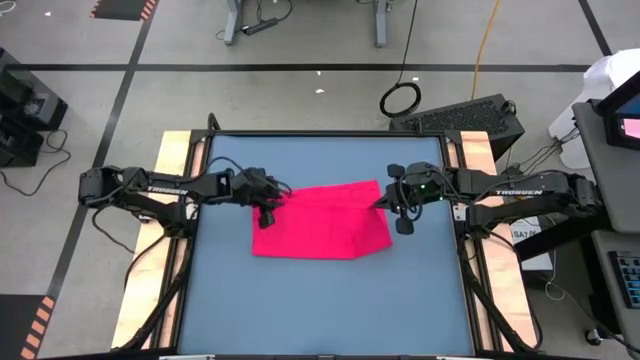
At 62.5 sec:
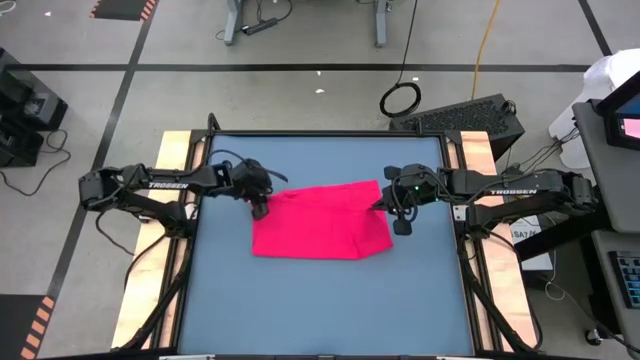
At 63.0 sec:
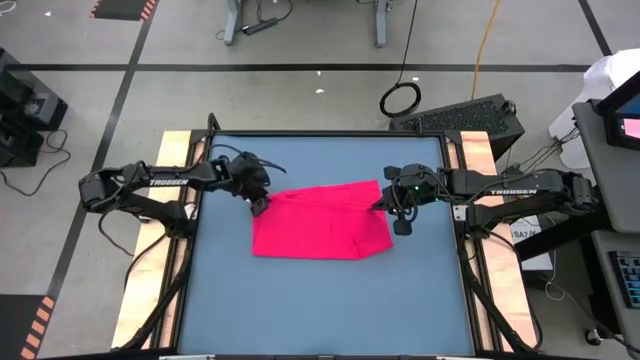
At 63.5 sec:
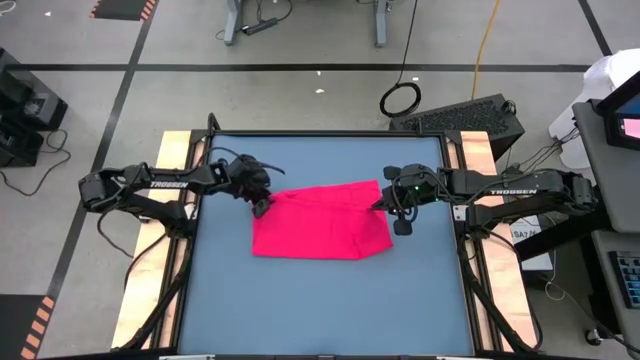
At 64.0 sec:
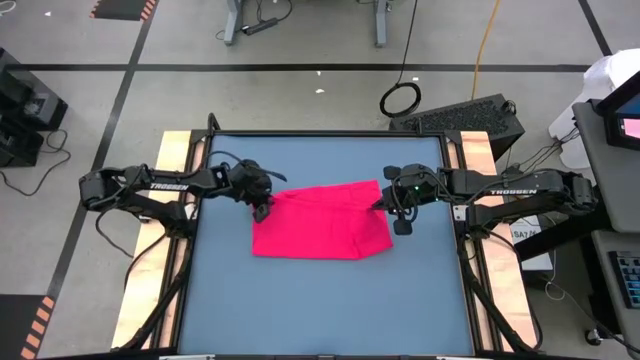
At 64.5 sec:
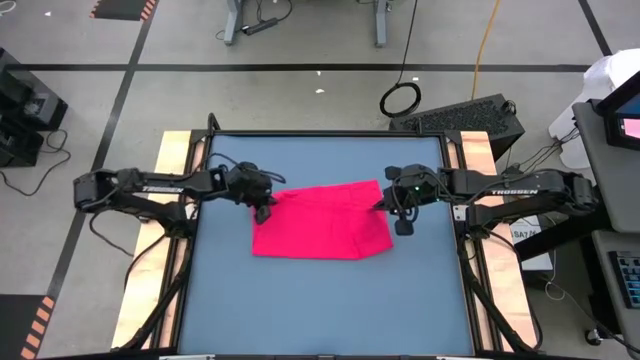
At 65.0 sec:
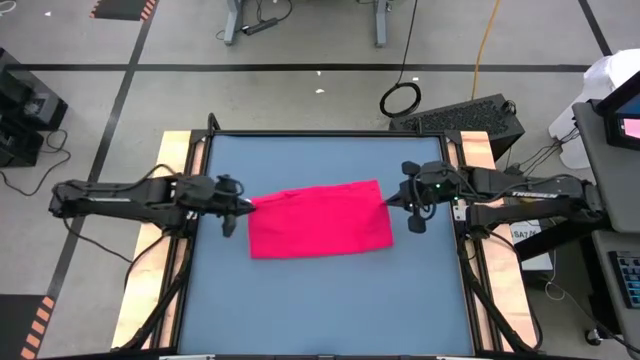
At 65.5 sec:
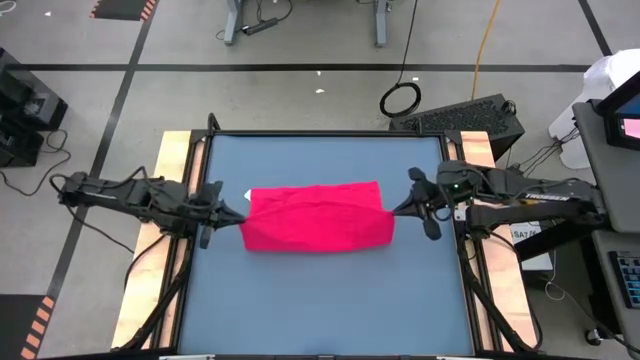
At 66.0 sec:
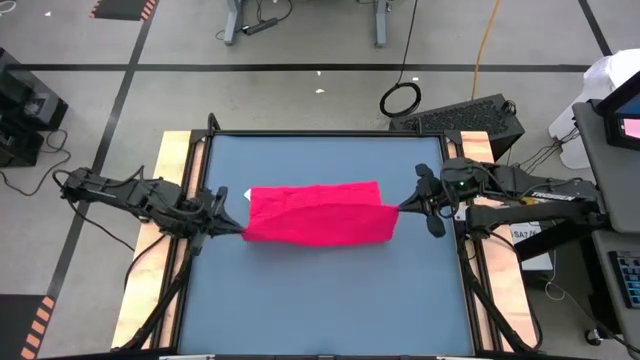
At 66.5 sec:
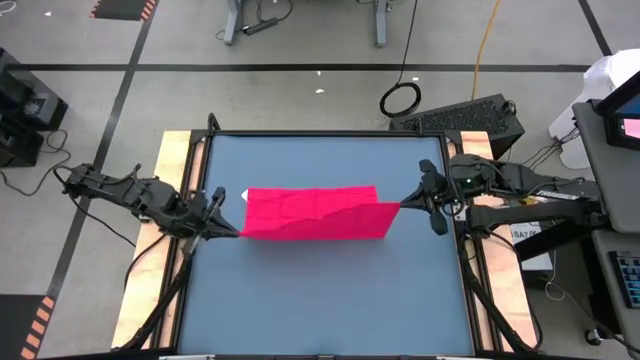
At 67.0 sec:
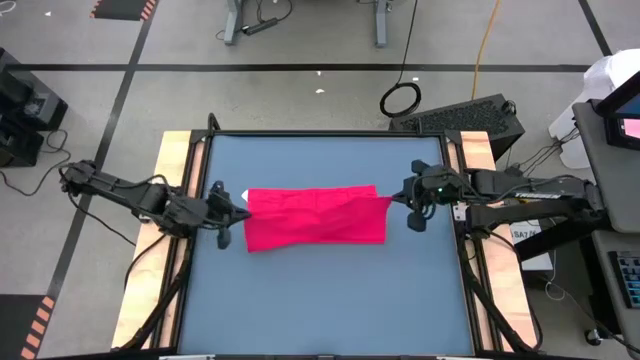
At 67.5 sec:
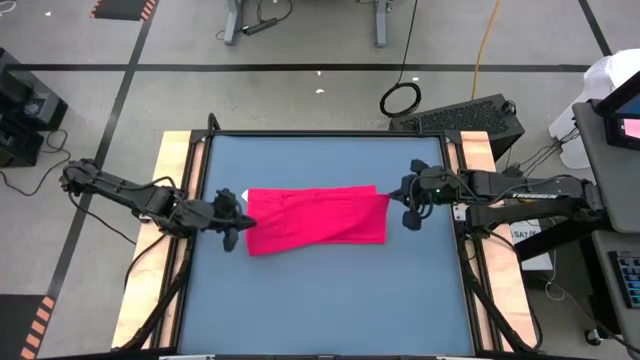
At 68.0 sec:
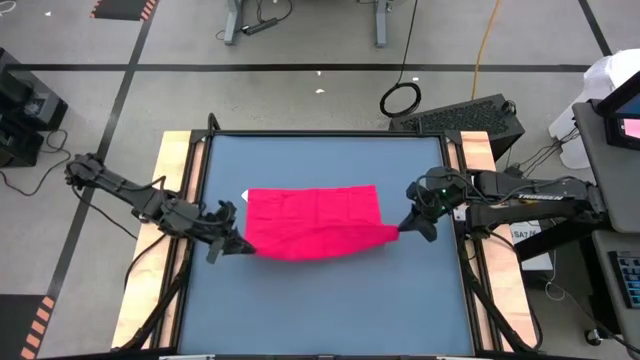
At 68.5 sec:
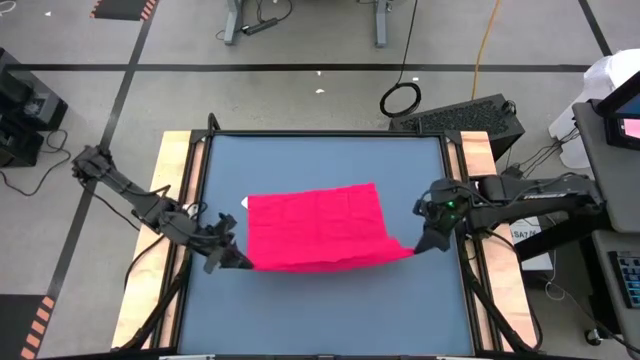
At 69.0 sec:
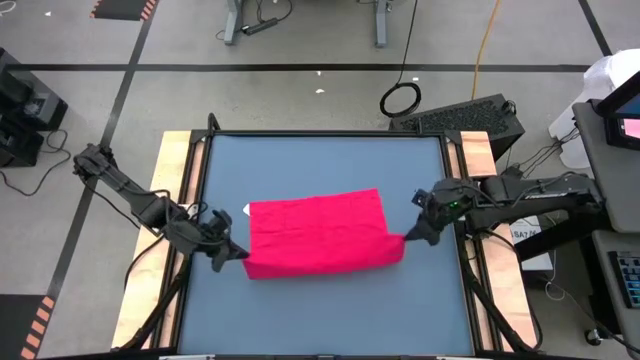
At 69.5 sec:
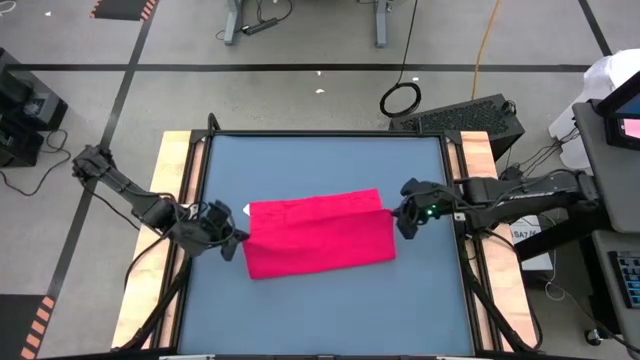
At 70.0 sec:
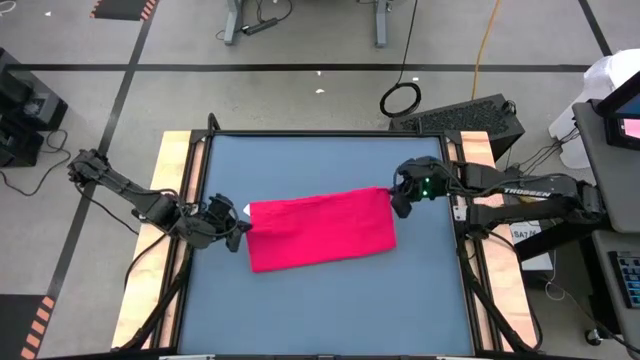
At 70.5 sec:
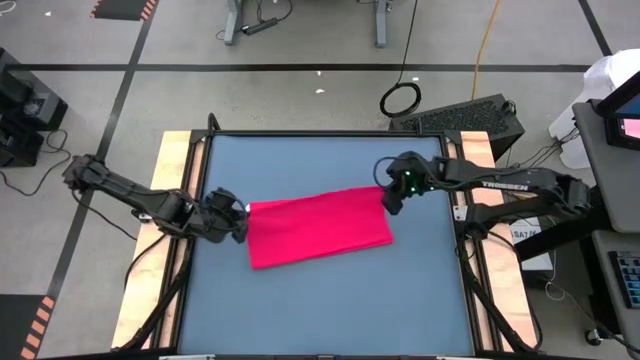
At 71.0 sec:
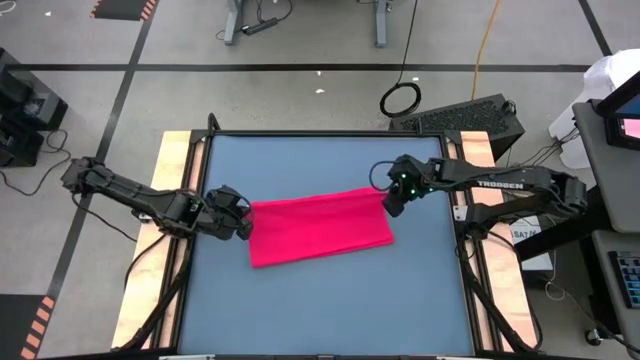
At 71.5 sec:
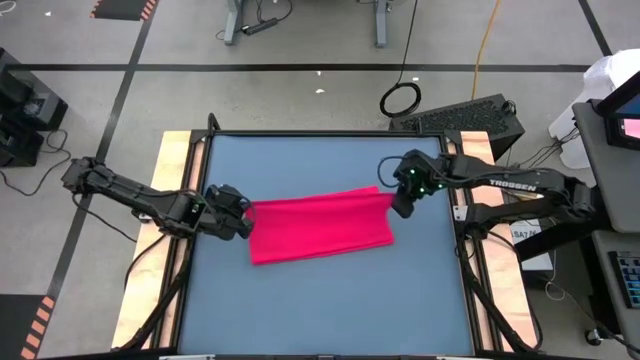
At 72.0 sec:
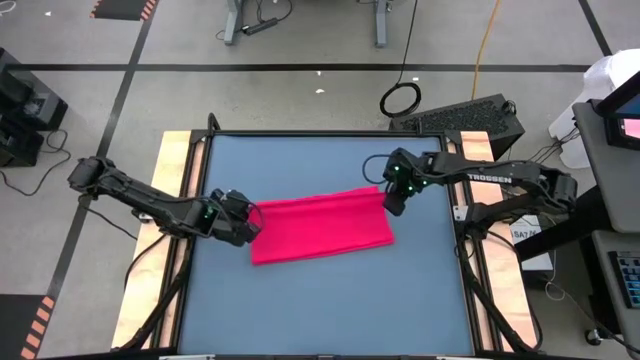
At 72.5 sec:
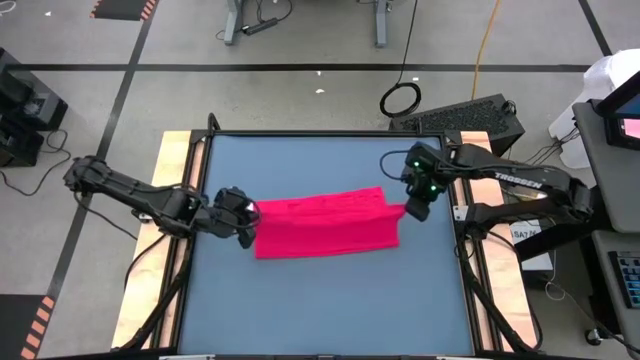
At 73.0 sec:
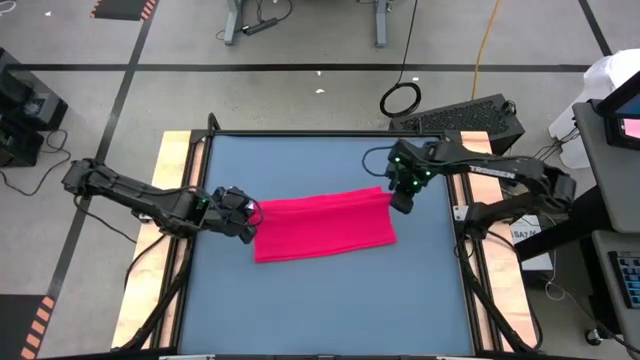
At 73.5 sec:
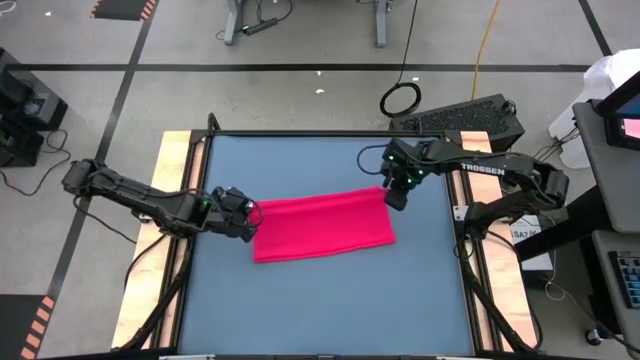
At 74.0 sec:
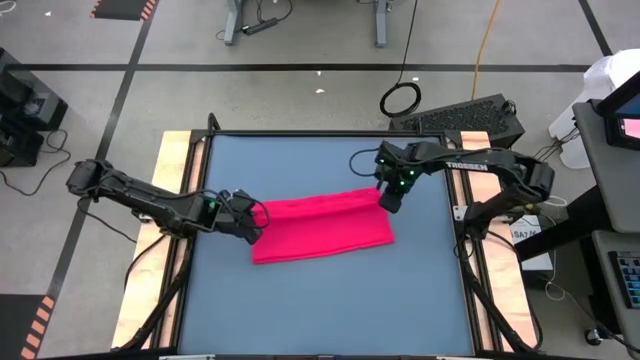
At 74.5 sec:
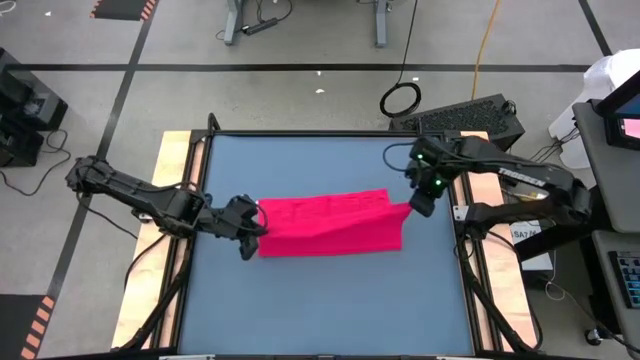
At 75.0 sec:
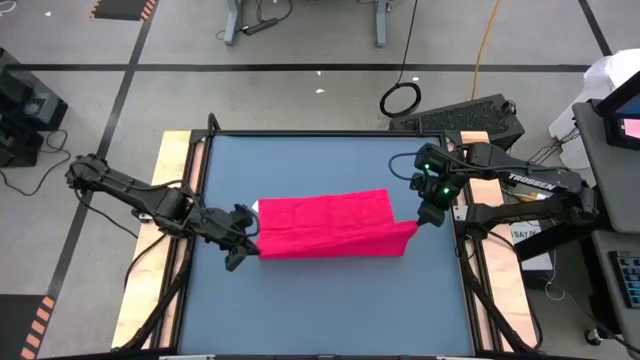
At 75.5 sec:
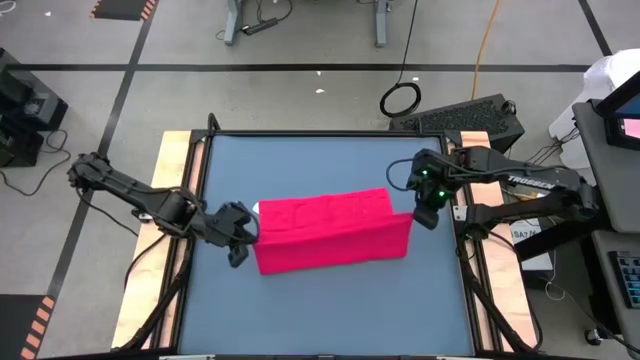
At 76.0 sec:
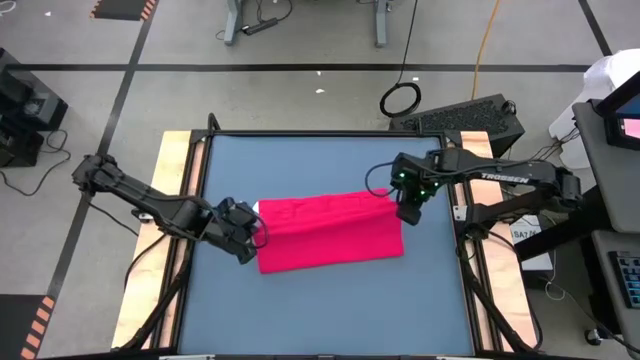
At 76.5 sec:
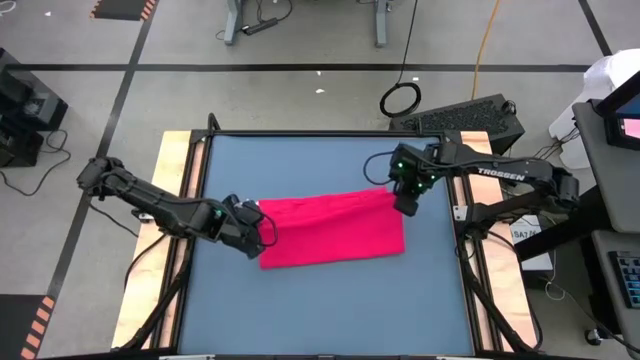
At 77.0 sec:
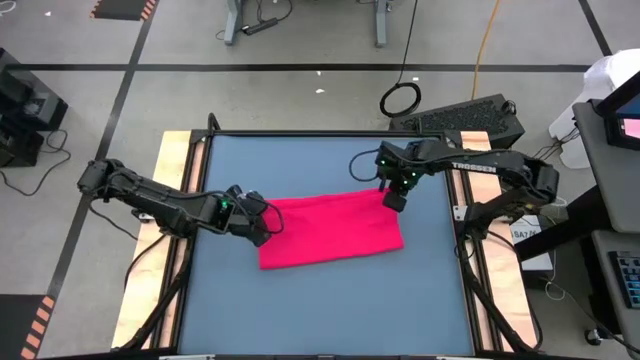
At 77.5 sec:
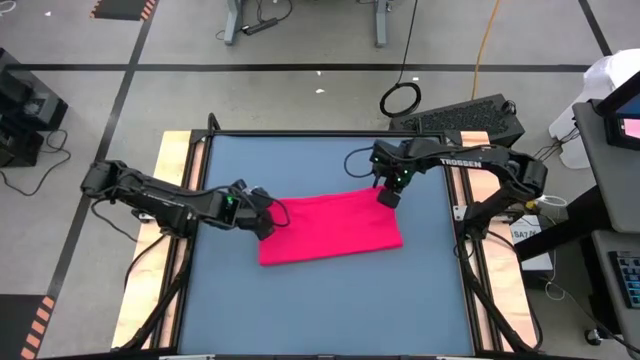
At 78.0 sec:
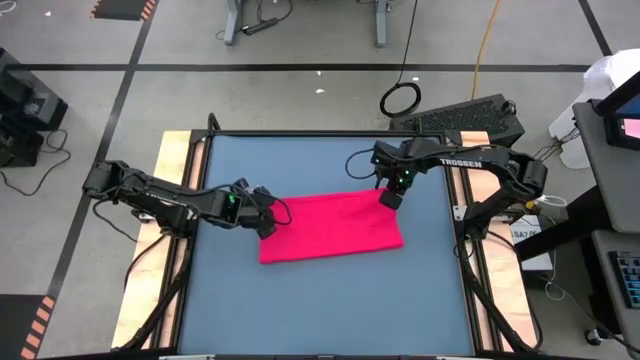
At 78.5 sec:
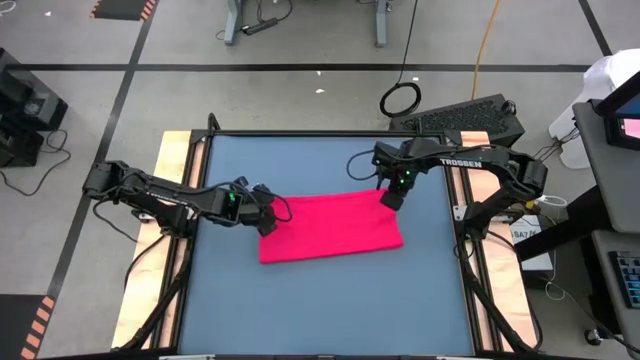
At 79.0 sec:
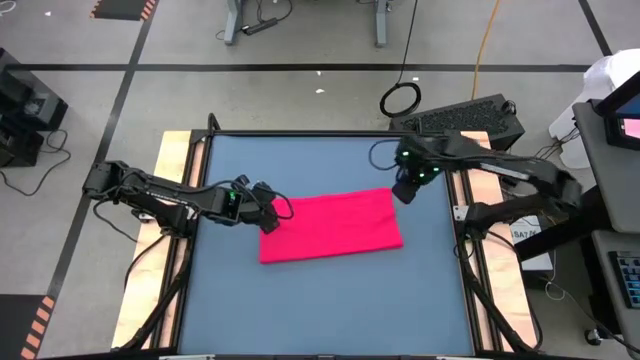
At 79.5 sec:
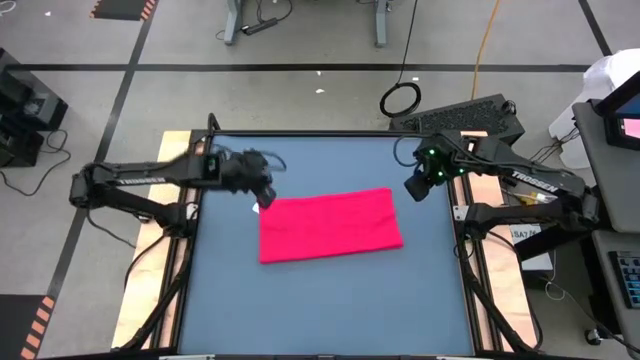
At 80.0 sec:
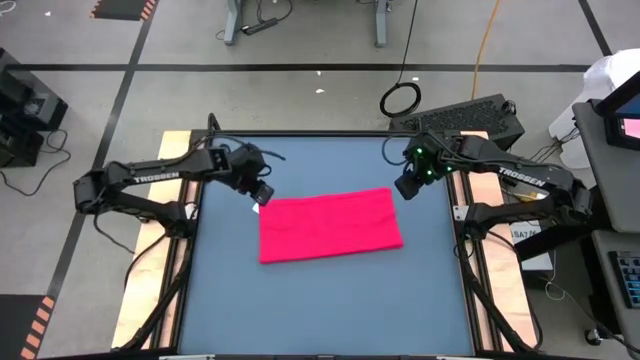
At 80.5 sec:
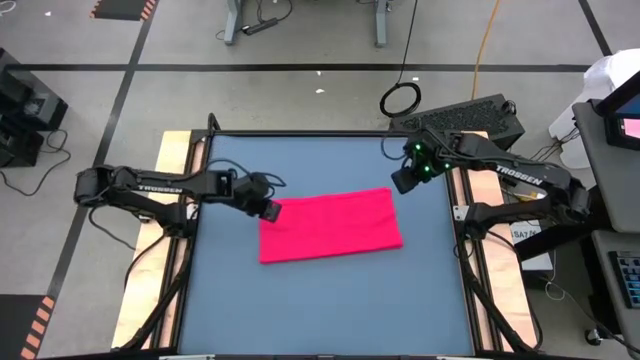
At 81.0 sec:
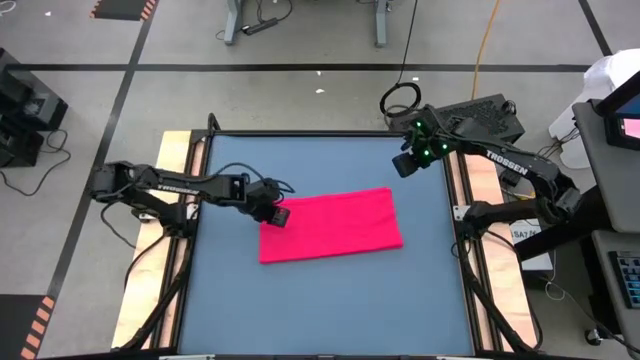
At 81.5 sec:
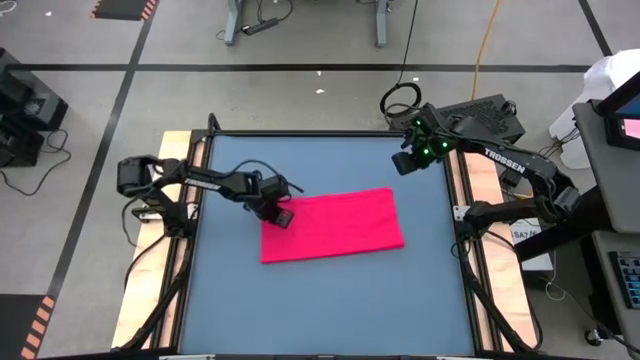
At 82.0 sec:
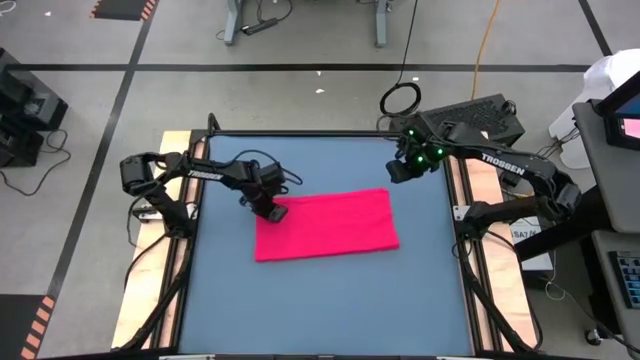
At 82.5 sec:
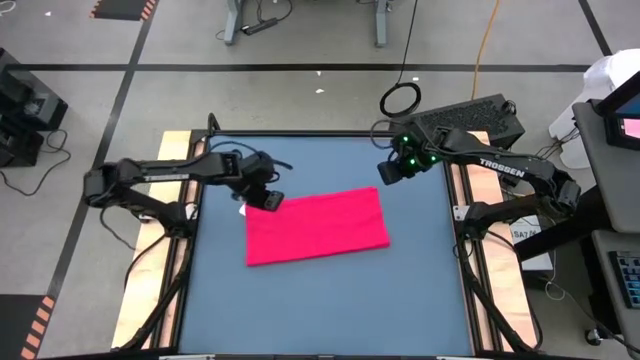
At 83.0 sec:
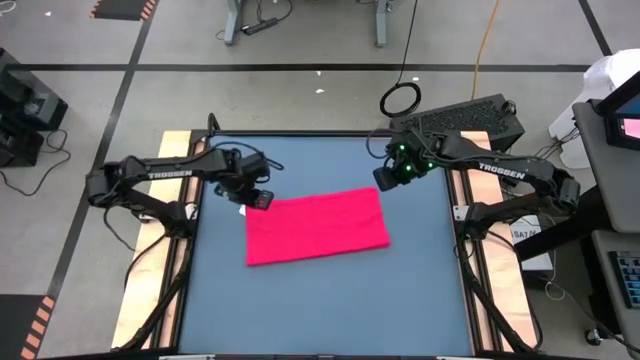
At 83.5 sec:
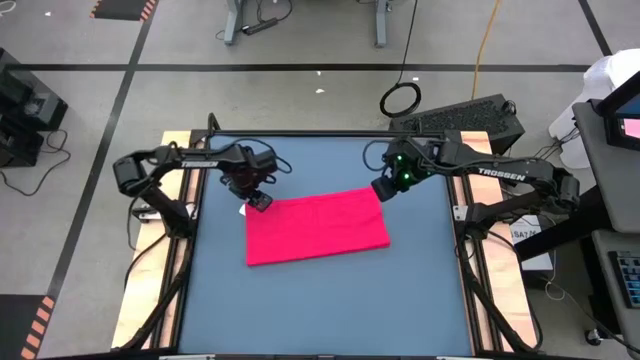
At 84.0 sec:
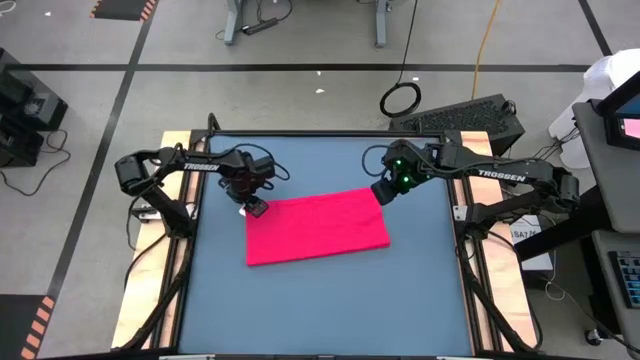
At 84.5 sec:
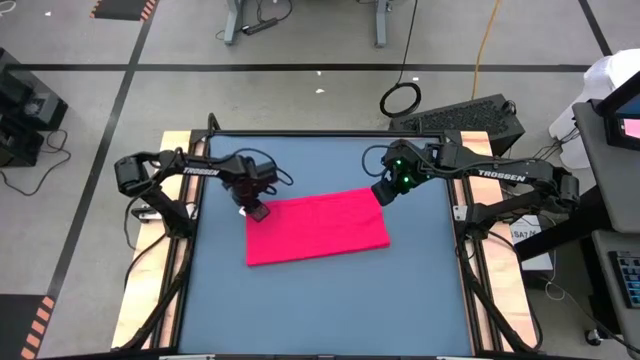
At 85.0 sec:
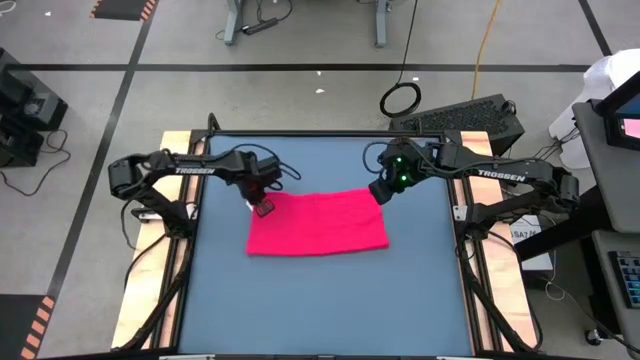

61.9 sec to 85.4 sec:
Task: Roll towel
Roll the red towel
